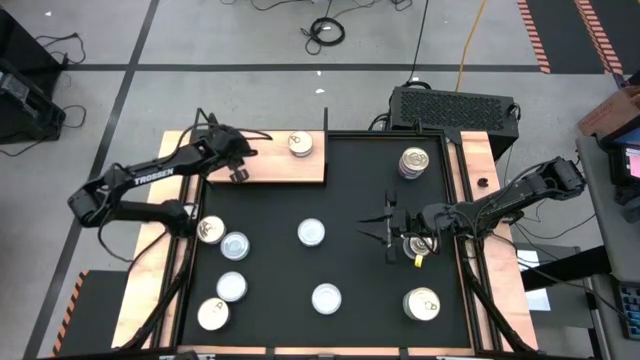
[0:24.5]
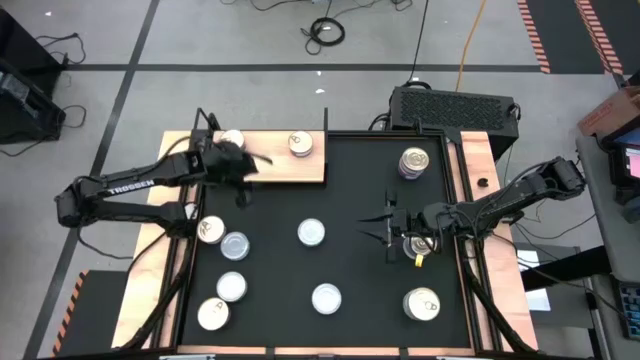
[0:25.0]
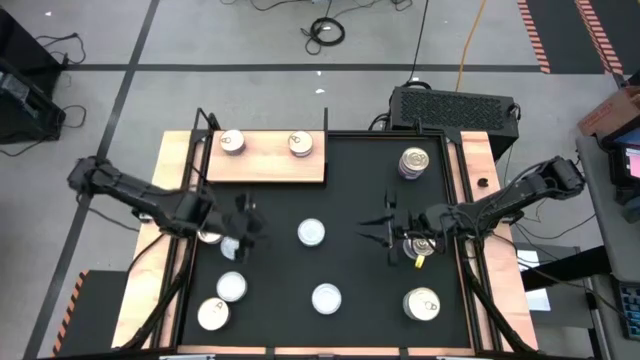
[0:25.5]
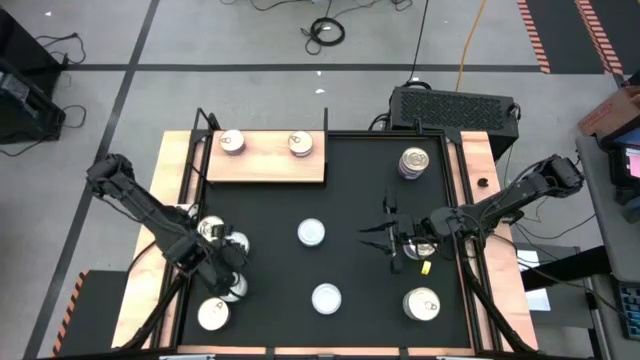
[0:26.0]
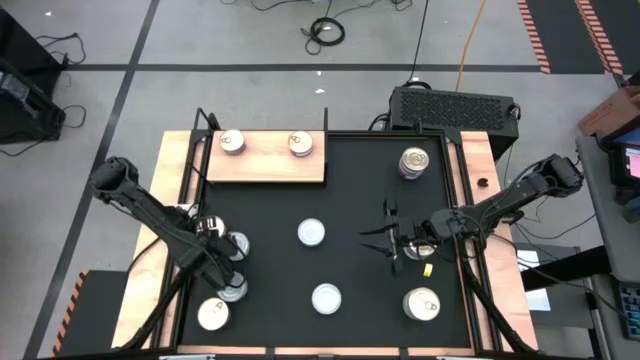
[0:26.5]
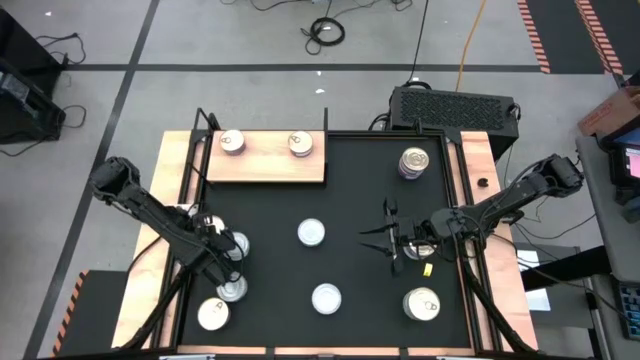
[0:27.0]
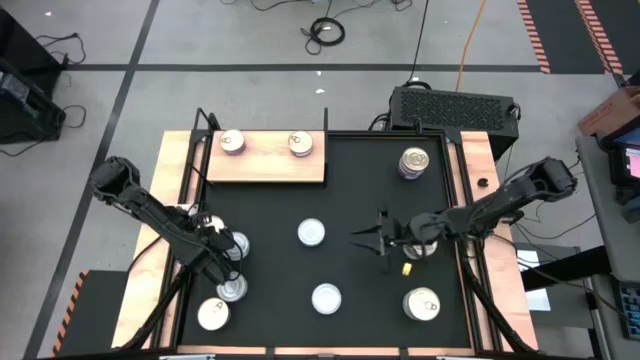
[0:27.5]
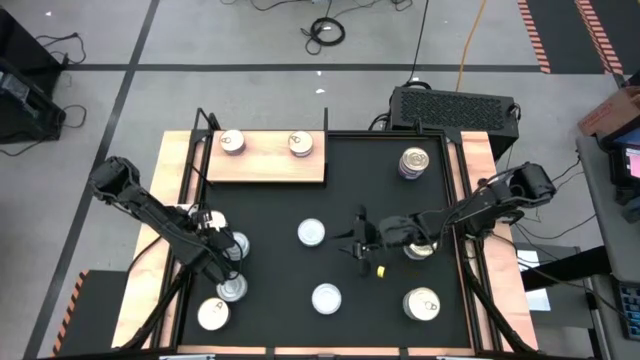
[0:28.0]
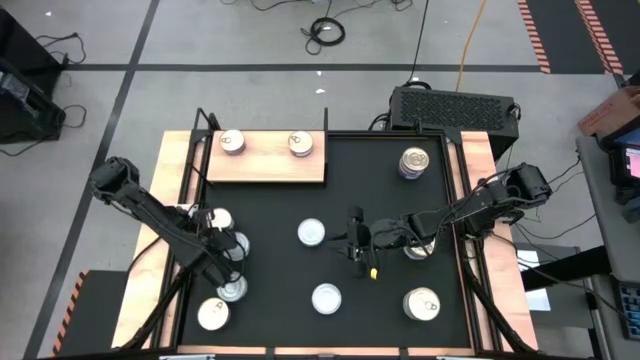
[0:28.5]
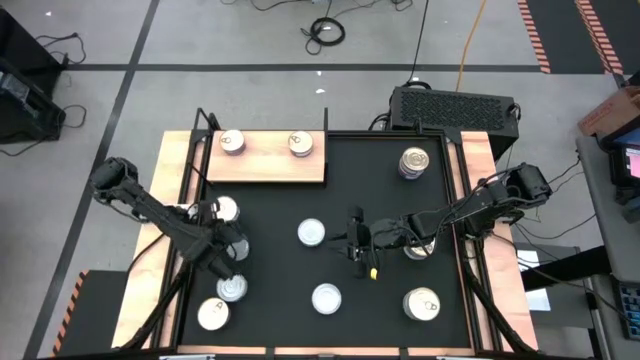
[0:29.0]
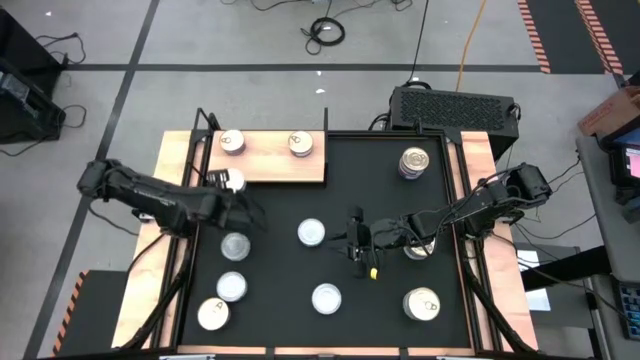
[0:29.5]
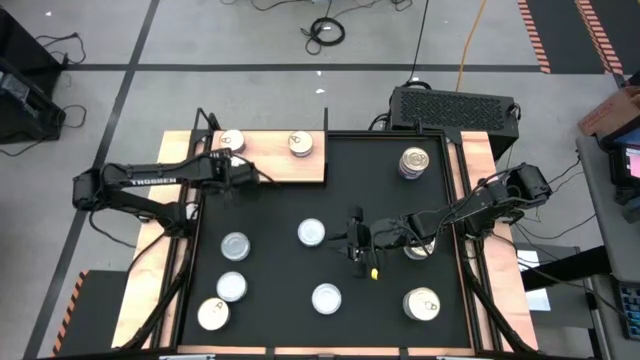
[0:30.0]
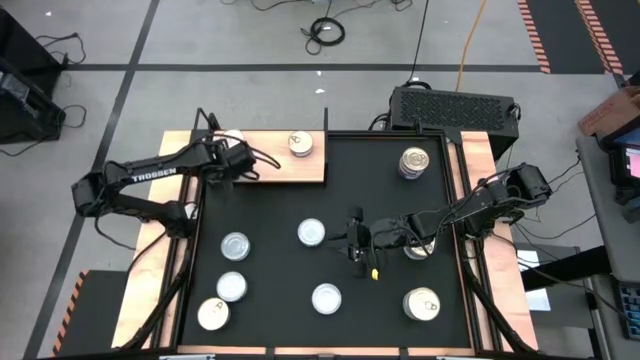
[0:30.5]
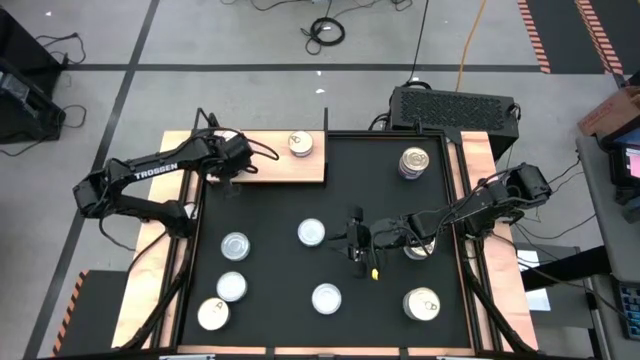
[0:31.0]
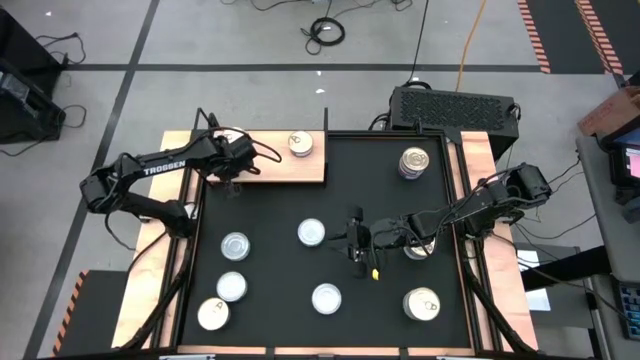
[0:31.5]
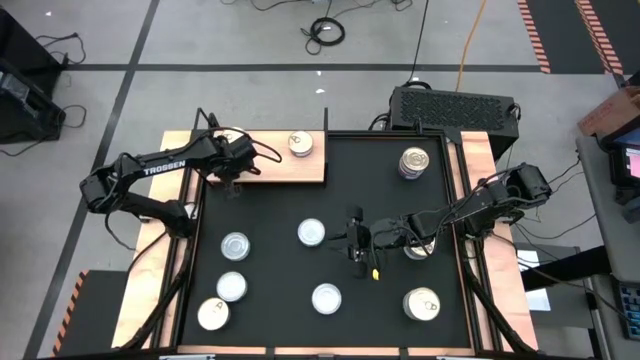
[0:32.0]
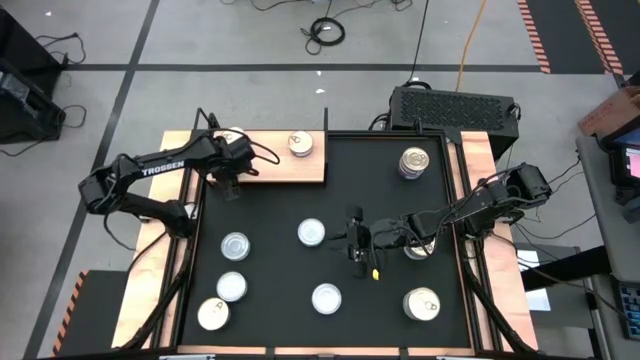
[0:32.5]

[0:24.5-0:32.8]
Task: Stack canned seafood by type on shelf
Put the blue-pink tuna can on the shelf

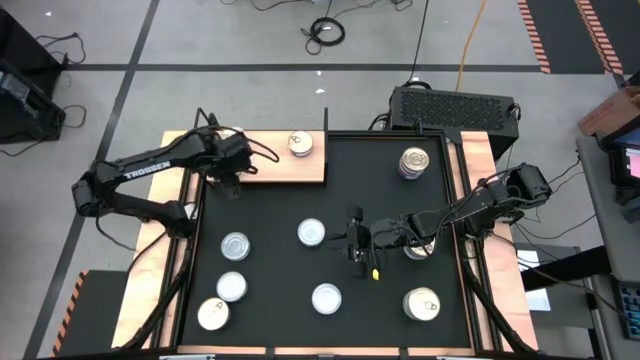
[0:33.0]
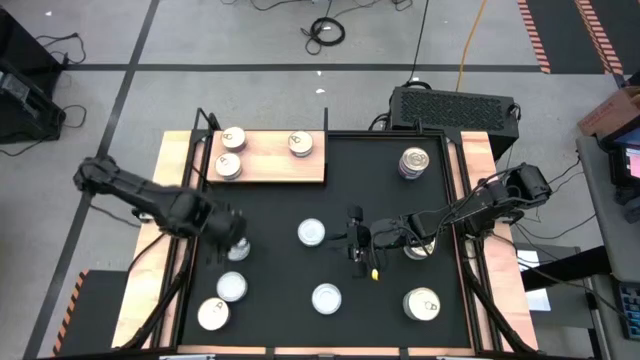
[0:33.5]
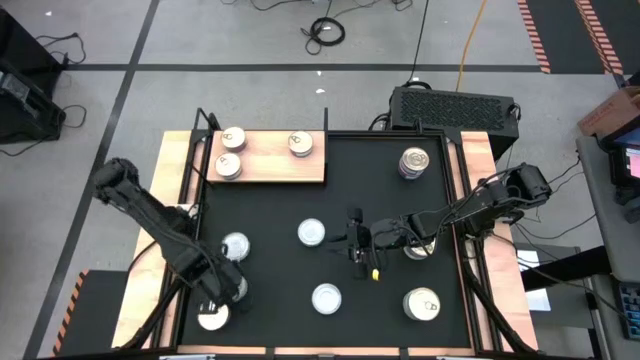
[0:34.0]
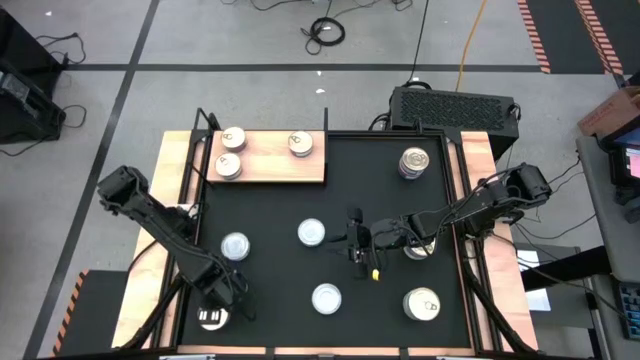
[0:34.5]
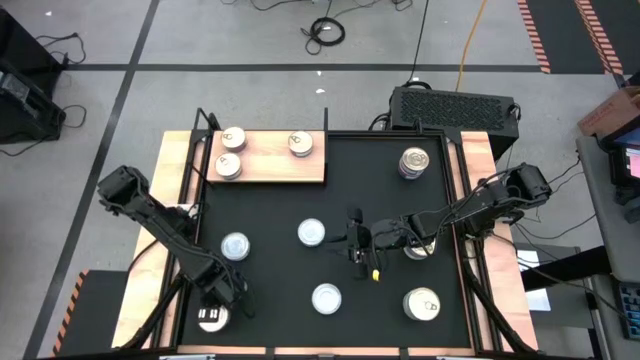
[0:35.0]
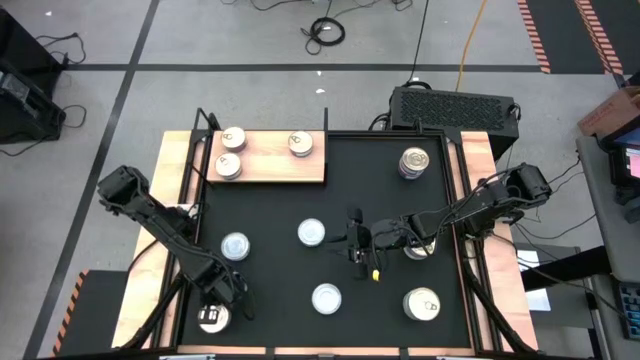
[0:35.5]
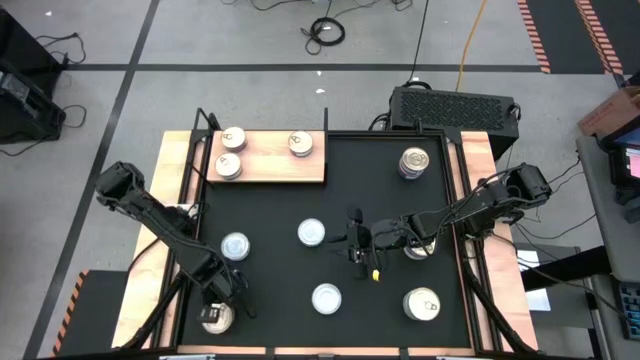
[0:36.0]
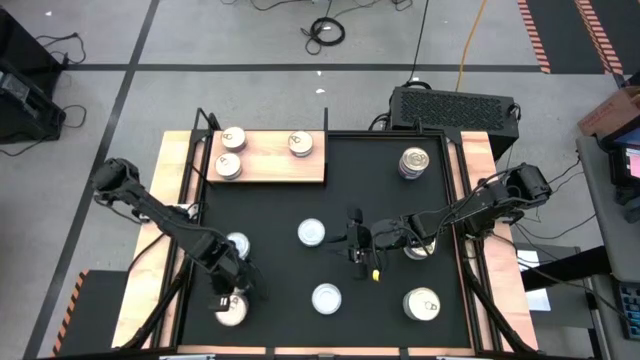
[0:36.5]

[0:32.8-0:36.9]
Put the blue-pink tuna can on the shelf

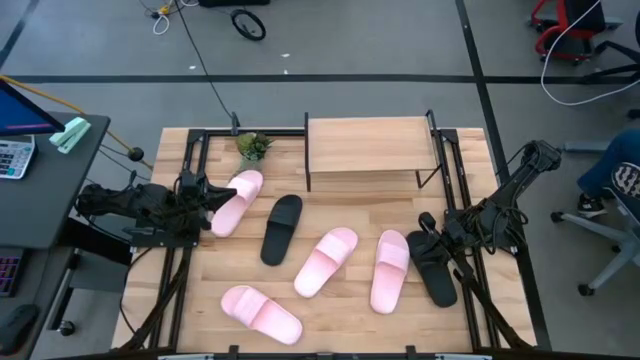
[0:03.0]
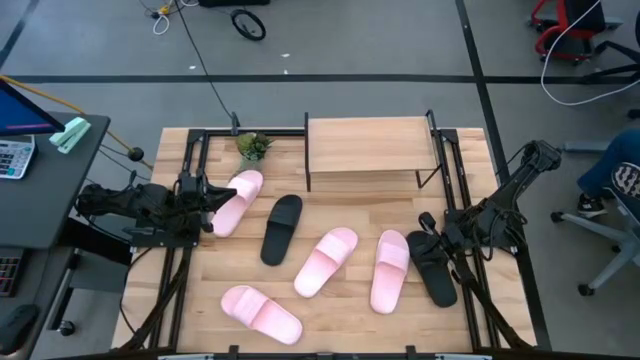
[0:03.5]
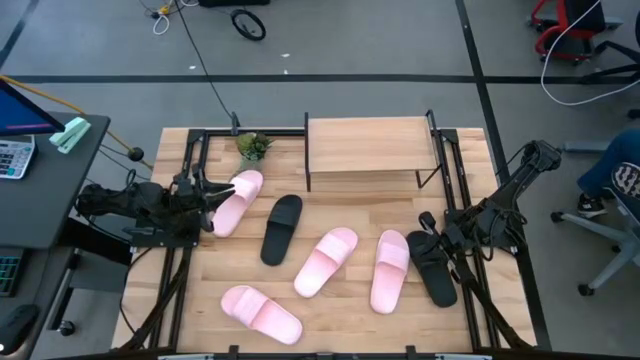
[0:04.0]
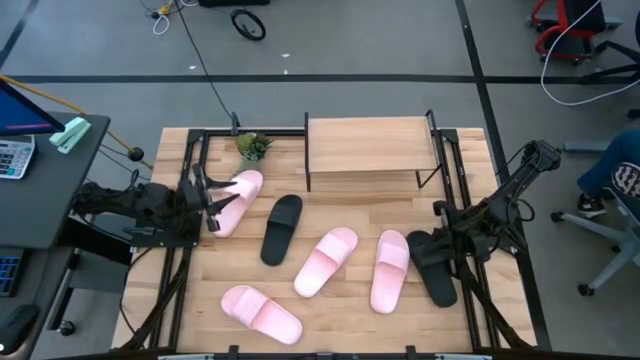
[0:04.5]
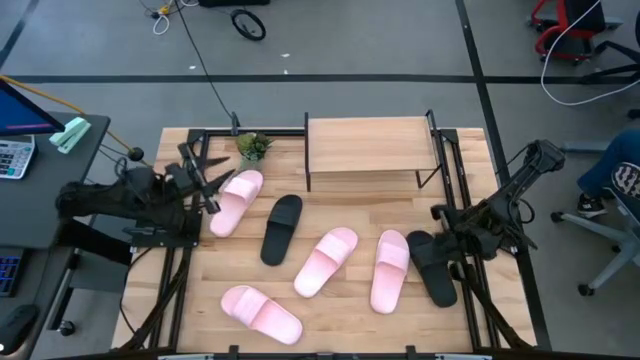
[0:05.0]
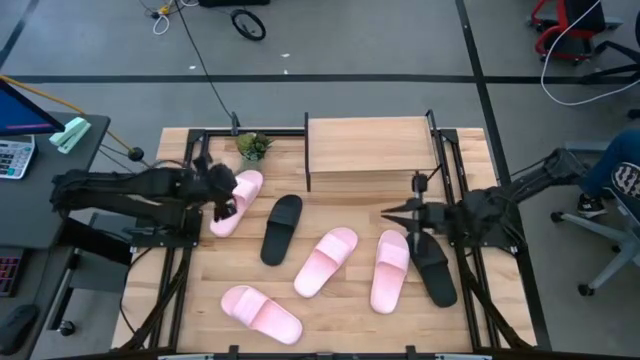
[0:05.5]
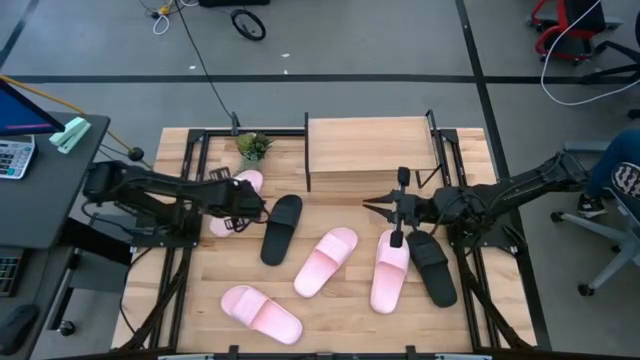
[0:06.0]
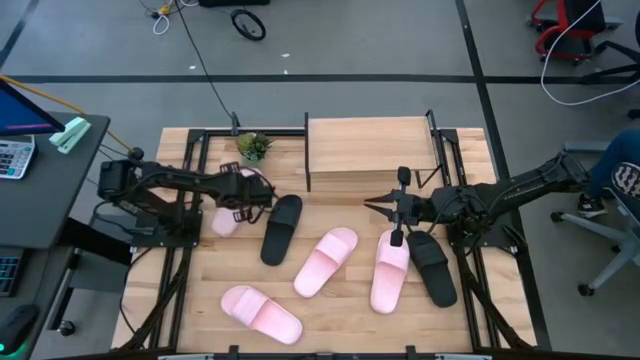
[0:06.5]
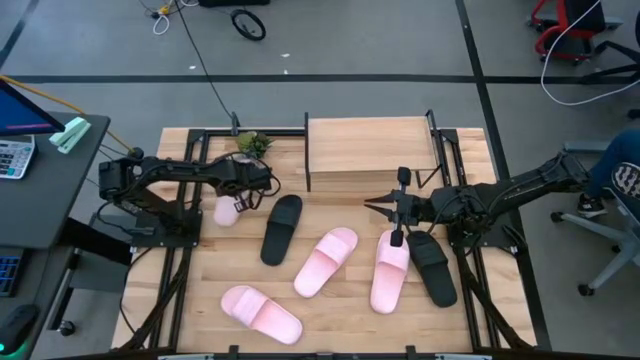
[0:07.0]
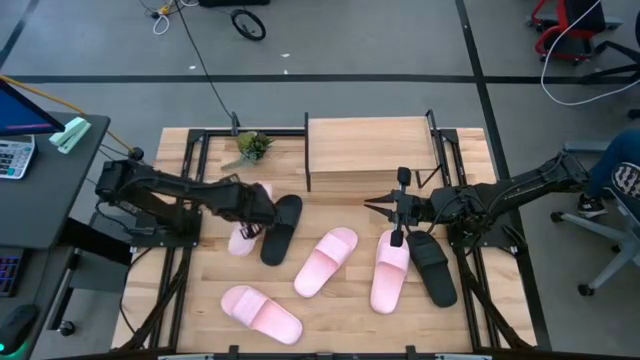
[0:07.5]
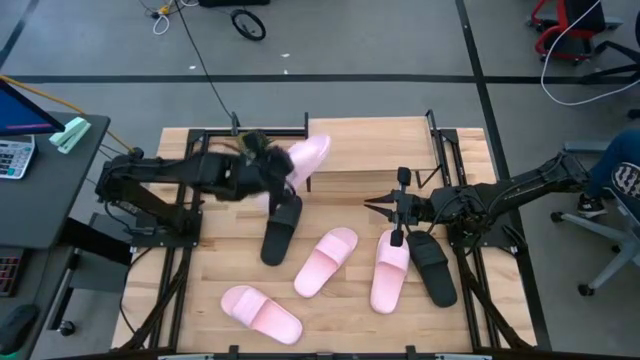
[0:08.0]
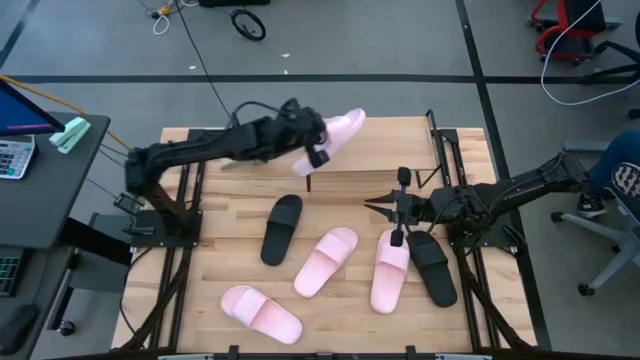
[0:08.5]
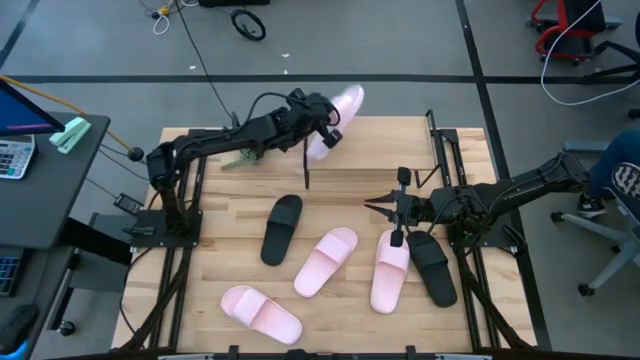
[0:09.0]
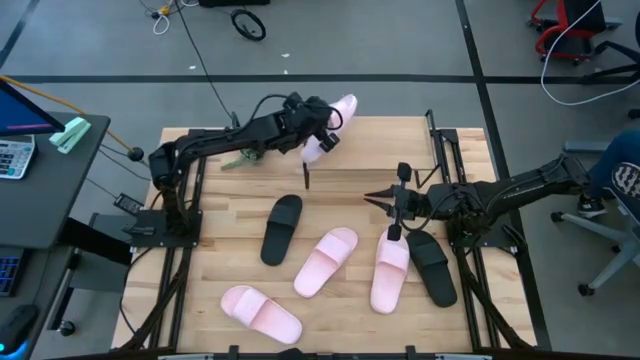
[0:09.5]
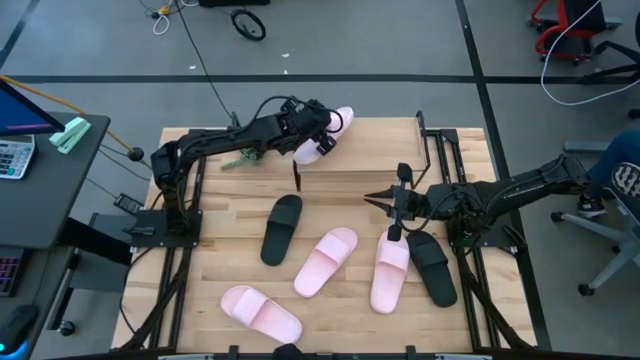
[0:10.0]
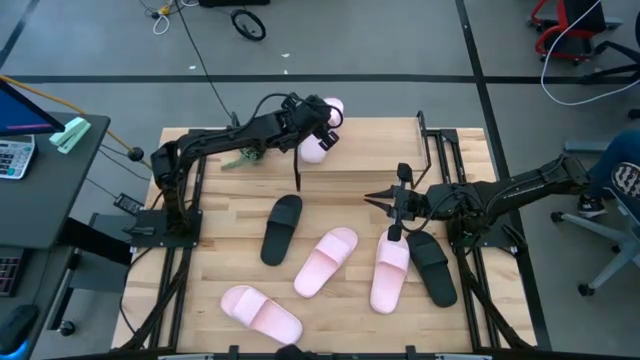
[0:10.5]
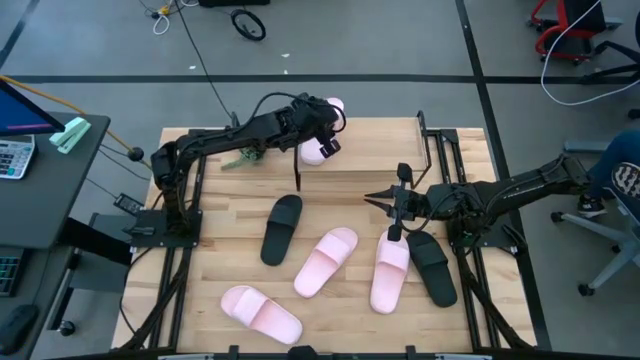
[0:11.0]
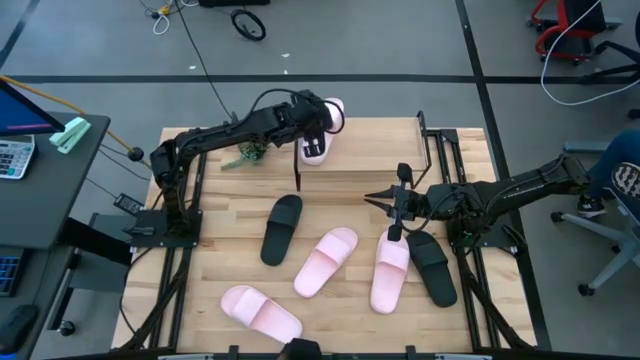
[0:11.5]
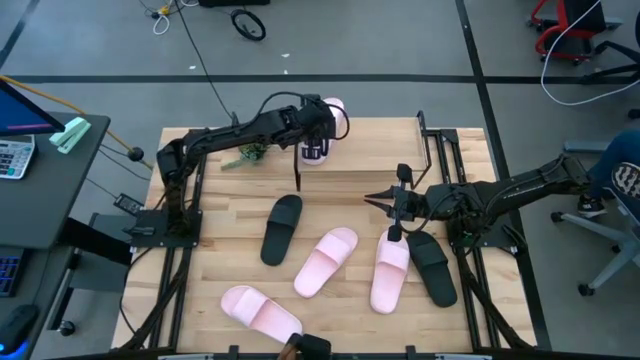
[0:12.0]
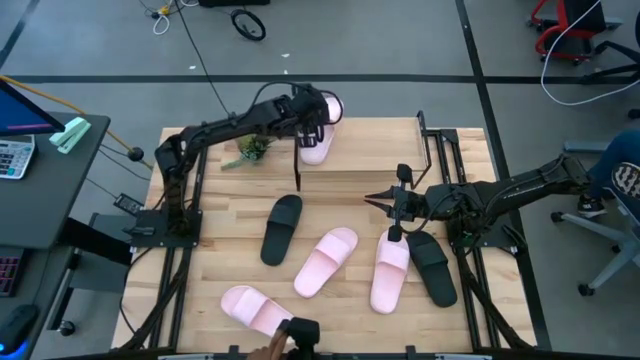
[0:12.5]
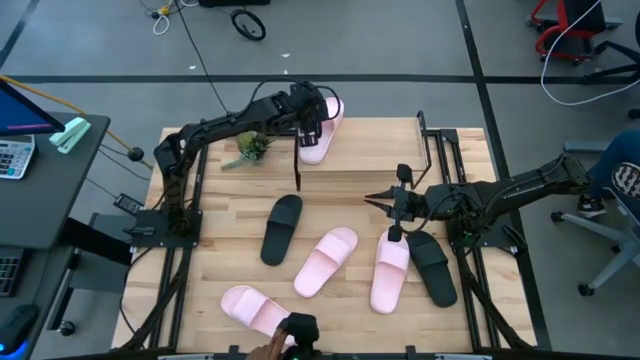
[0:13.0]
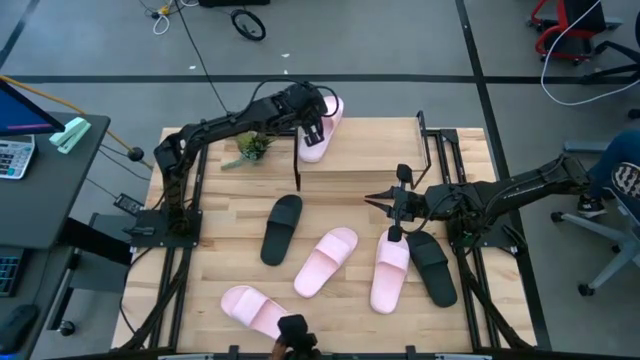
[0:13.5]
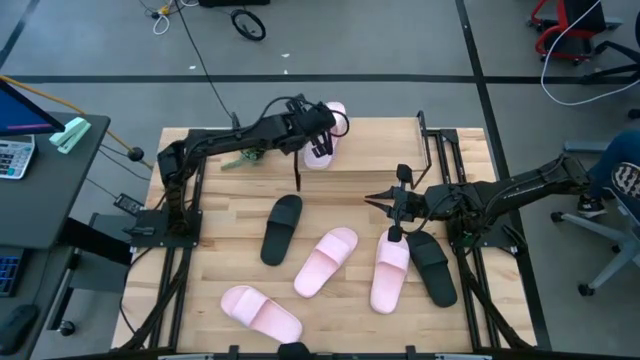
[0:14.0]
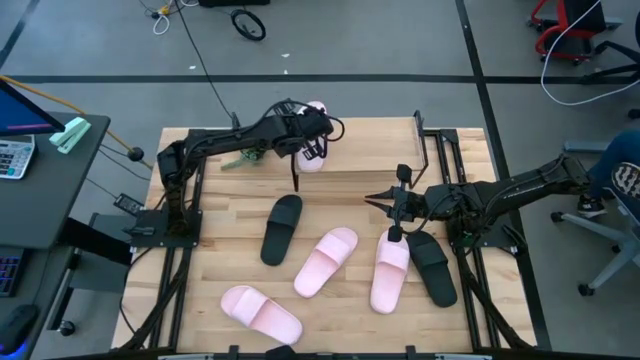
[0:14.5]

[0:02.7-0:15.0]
Task: Pick and place slides into the shelf
Put the top left pink slide on the shelf
